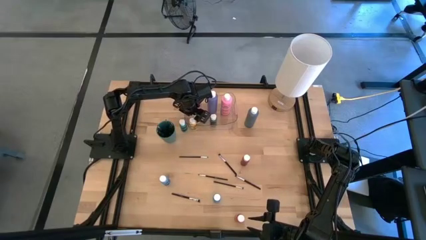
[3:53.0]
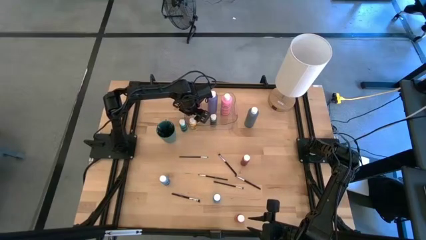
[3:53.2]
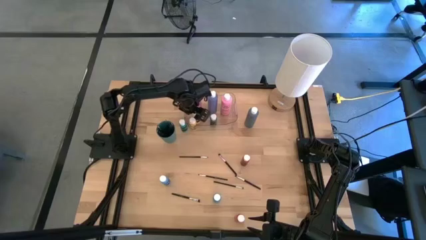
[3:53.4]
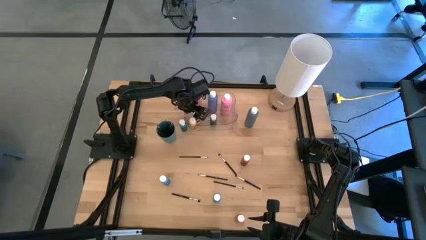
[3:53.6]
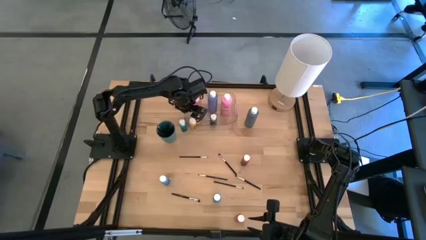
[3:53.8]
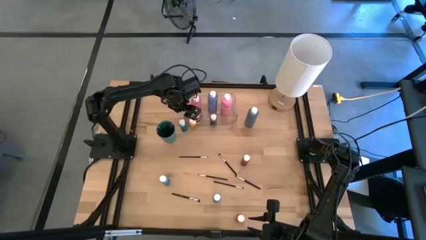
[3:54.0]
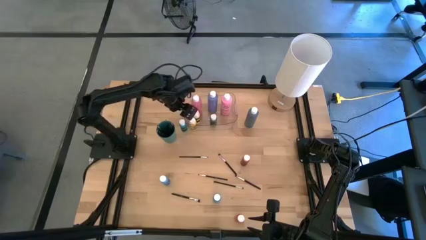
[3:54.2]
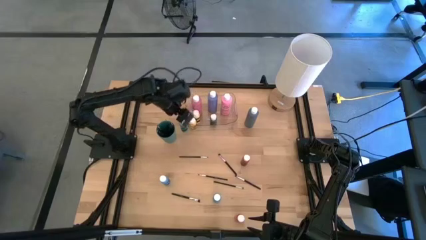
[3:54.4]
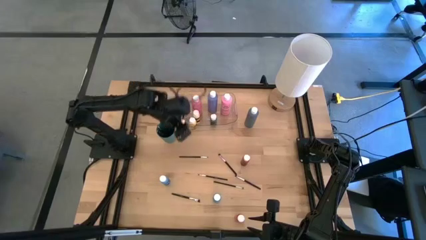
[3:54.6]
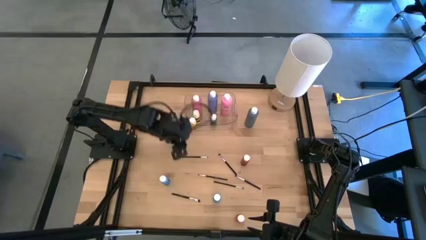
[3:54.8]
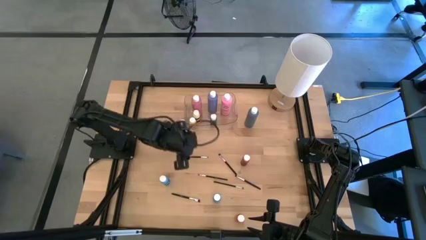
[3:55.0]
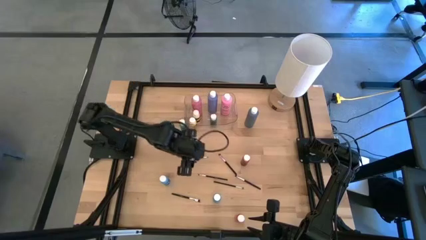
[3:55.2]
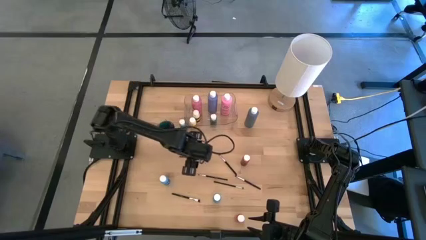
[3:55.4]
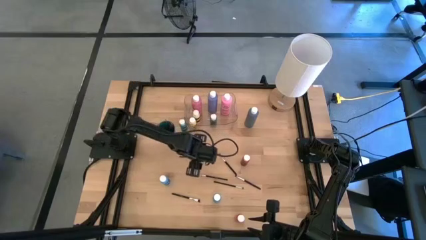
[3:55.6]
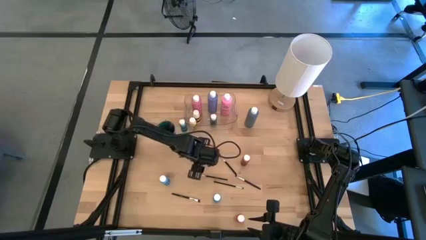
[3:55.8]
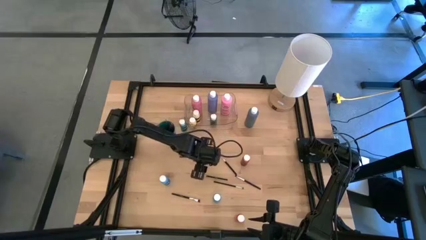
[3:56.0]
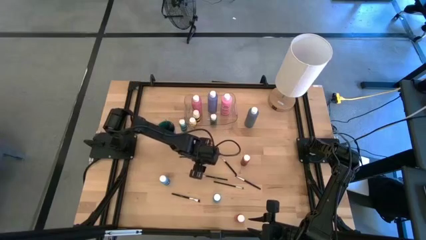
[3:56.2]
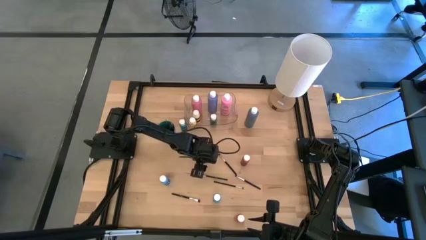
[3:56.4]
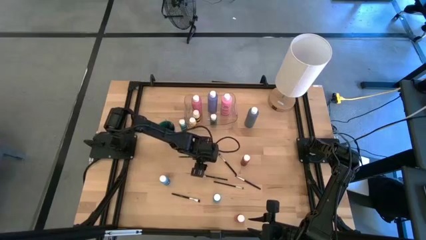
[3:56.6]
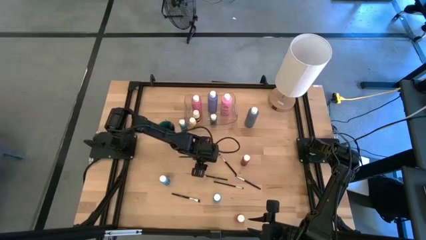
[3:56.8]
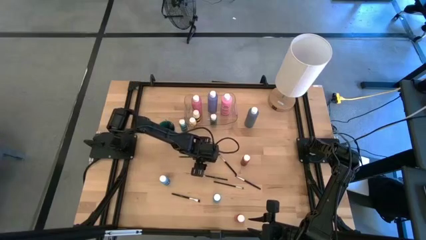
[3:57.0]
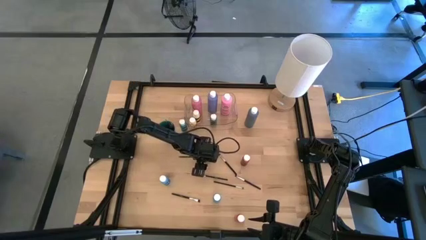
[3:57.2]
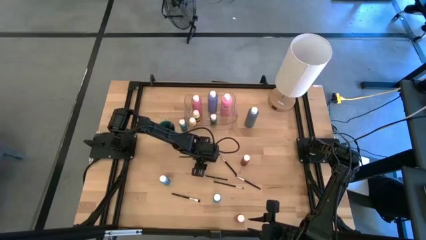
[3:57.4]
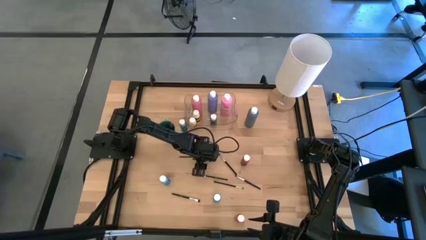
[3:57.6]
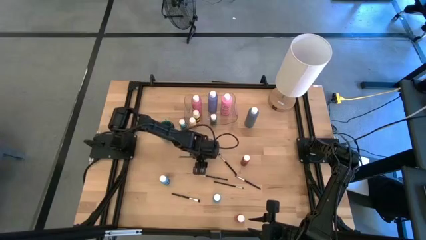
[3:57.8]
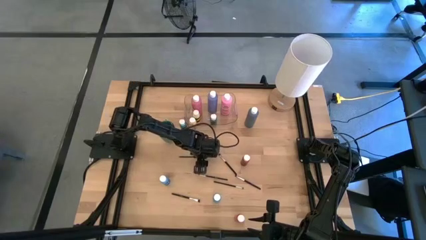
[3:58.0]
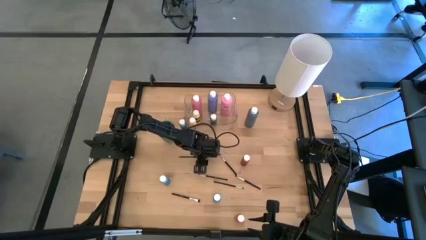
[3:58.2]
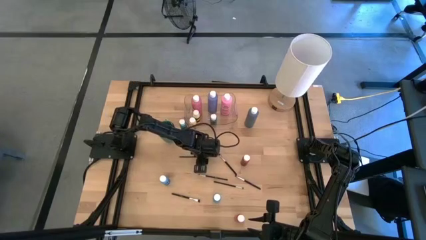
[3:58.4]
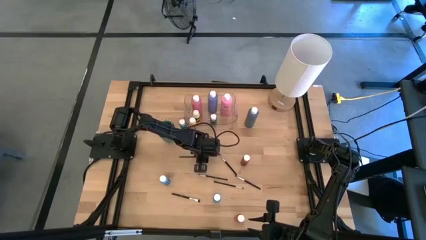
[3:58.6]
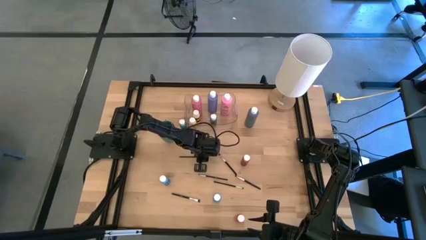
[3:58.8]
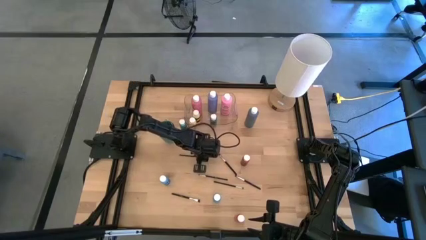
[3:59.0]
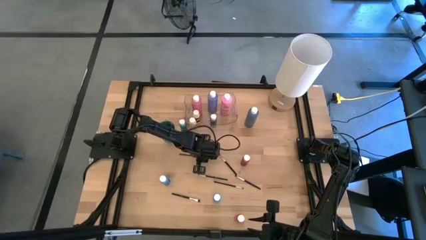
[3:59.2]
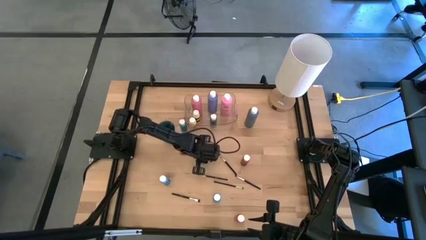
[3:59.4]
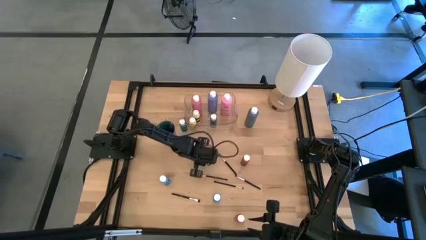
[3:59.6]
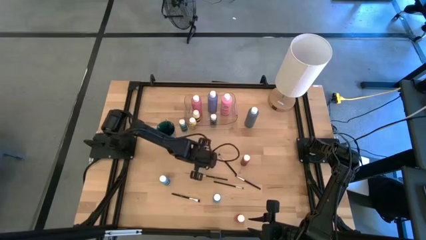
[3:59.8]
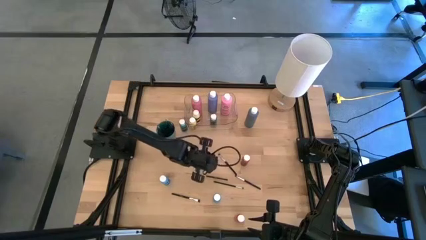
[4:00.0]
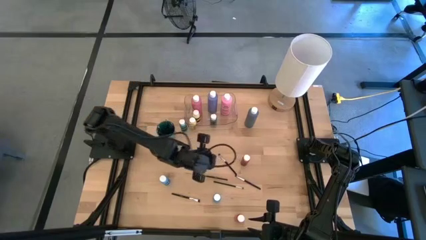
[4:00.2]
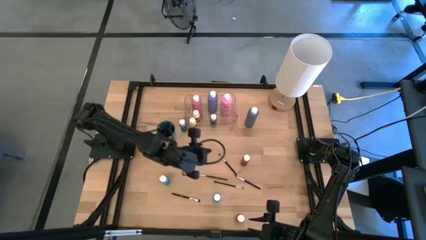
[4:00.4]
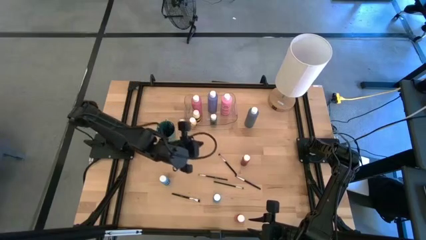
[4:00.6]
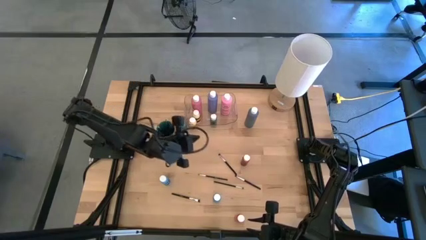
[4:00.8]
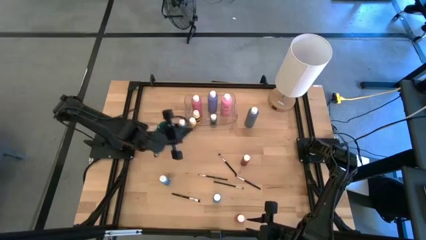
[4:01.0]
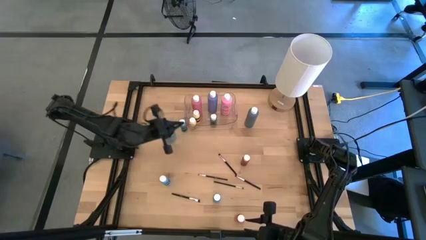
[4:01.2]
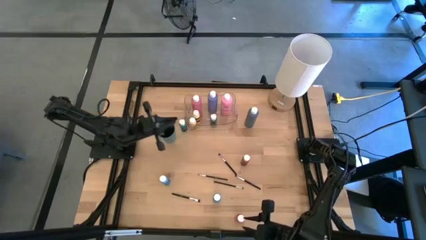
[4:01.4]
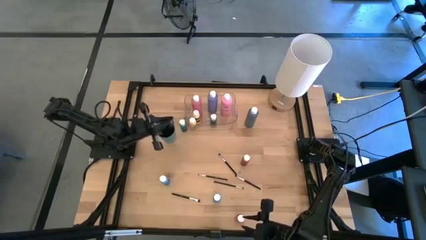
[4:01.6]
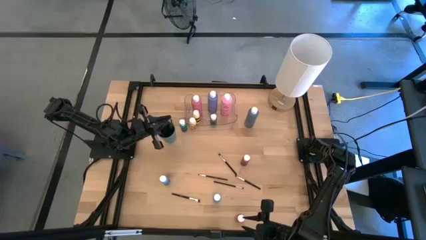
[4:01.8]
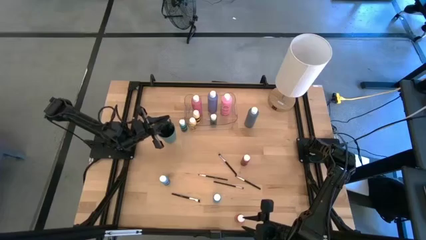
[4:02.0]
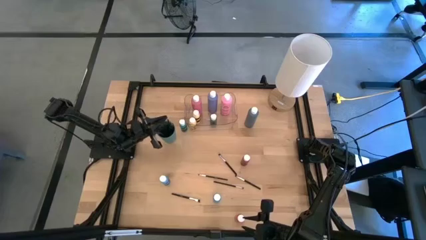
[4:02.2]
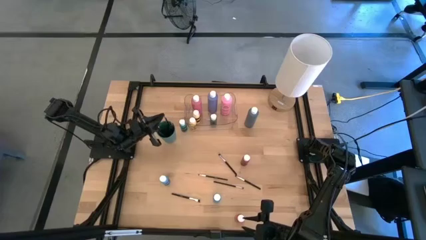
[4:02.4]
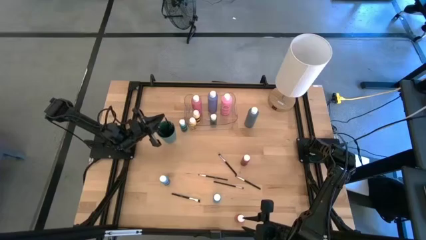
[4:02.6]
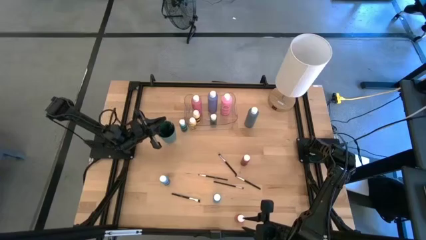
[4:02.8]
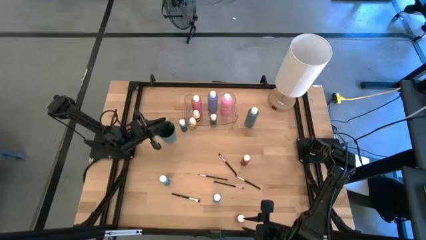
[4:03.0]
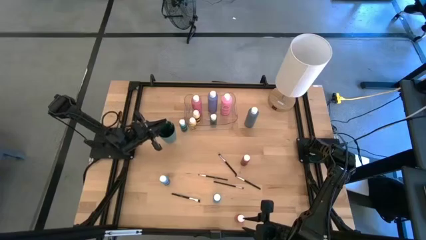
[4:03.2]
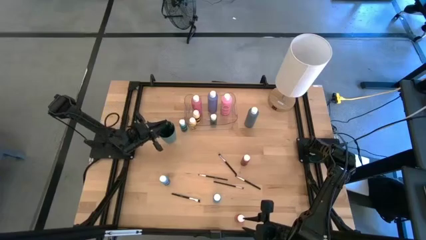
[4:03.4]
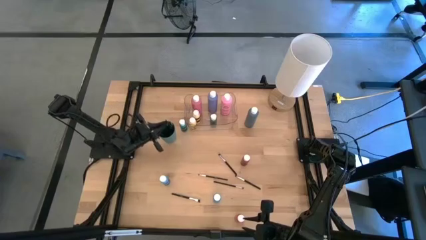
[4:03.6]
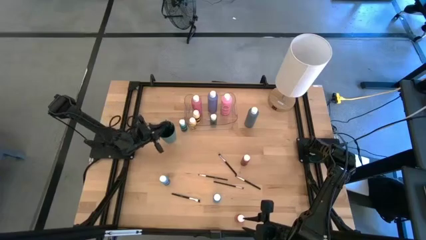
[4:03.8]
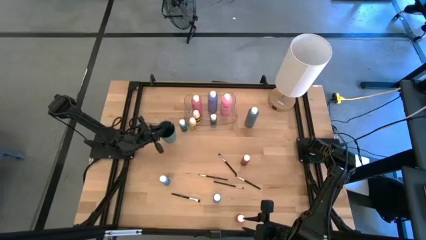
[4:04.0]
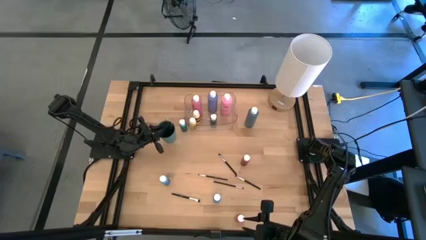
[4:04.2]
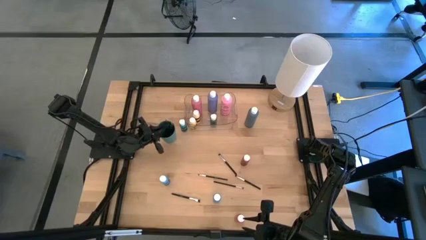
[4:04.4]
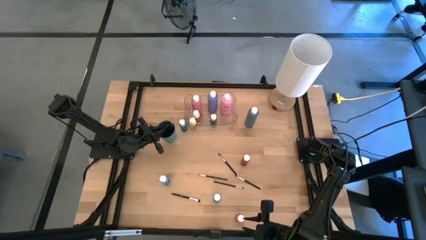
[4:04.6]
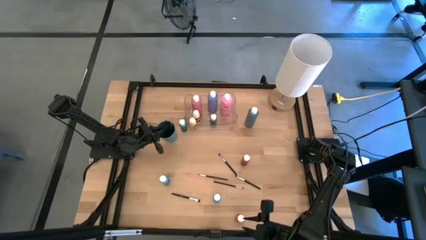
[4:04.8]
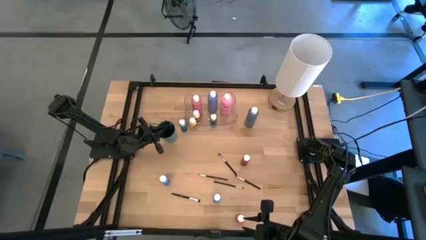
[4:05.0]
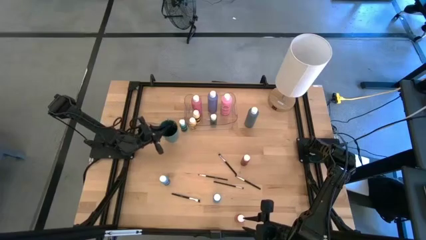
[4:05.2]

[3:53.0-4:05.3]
Task: Pick & Place Paint Supplies
Put the black paint brush into the green cup

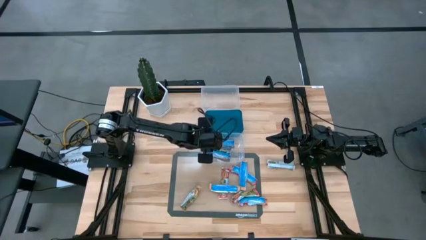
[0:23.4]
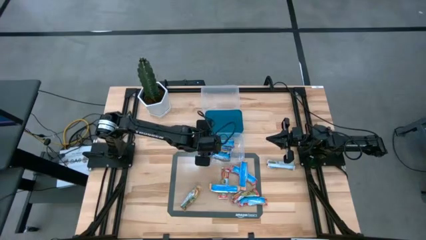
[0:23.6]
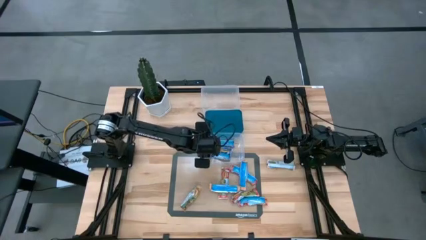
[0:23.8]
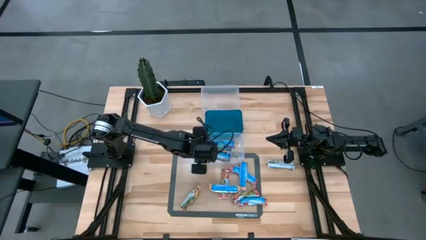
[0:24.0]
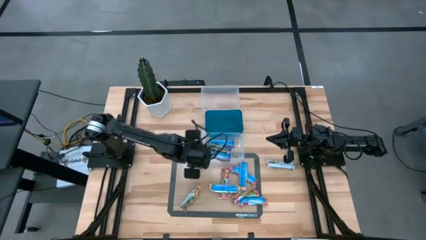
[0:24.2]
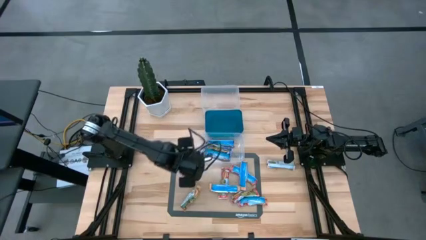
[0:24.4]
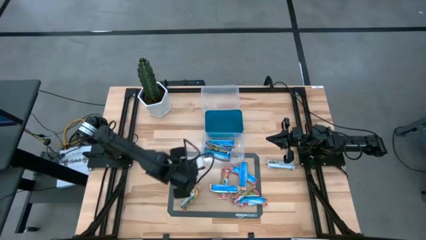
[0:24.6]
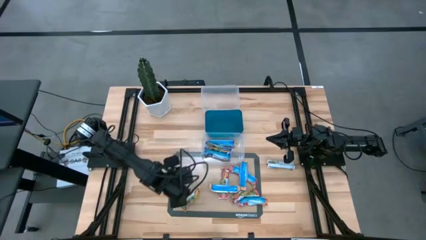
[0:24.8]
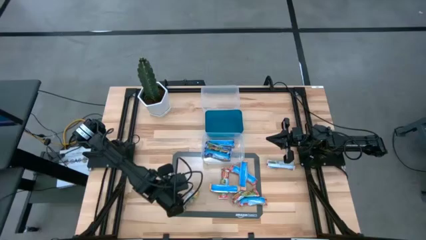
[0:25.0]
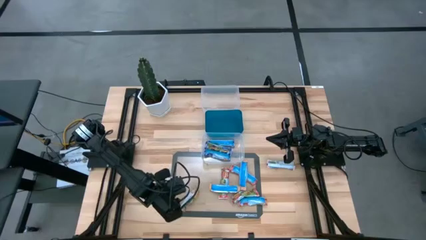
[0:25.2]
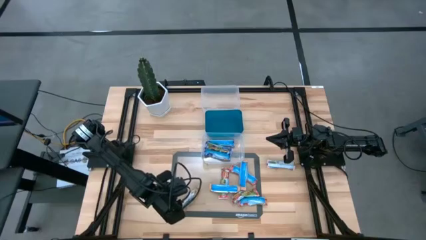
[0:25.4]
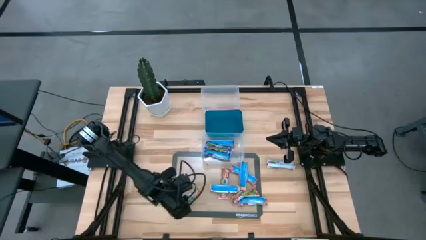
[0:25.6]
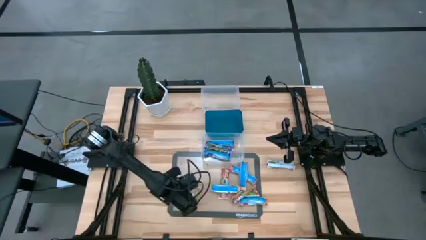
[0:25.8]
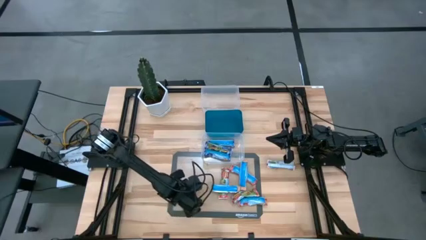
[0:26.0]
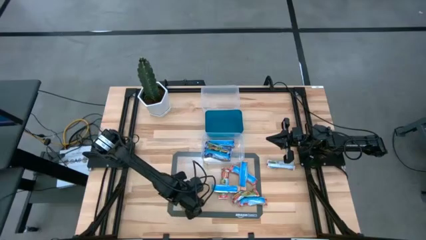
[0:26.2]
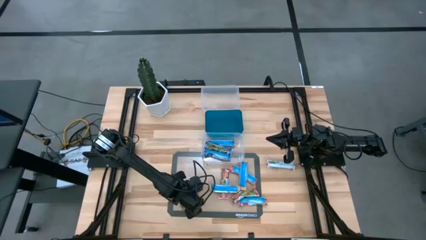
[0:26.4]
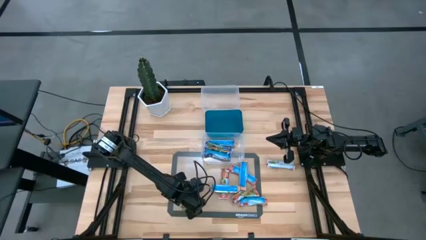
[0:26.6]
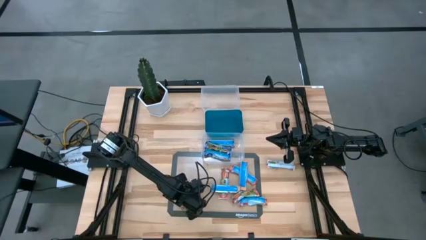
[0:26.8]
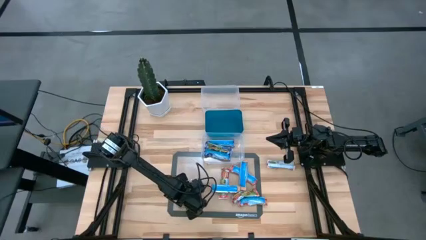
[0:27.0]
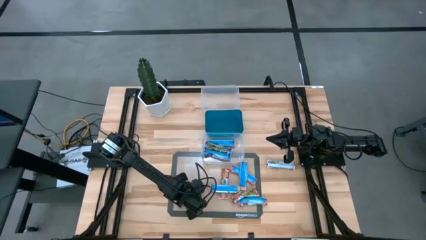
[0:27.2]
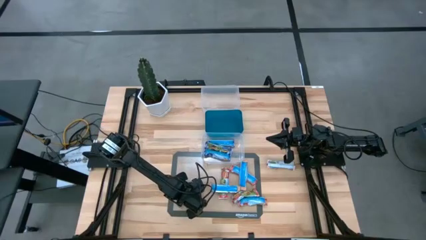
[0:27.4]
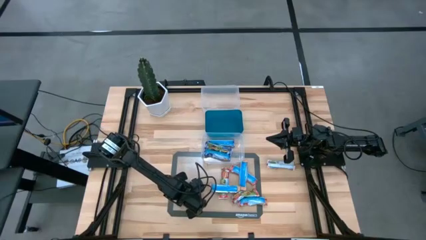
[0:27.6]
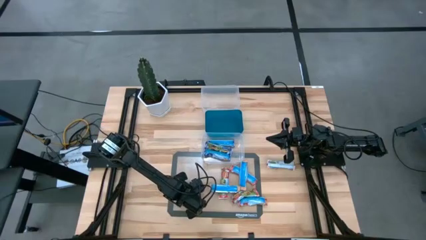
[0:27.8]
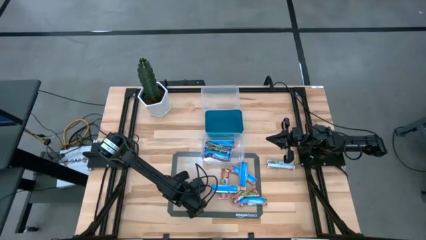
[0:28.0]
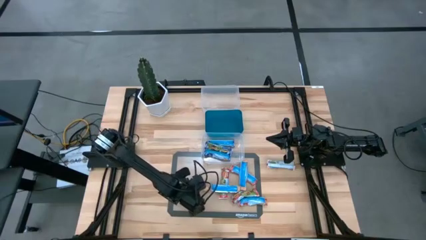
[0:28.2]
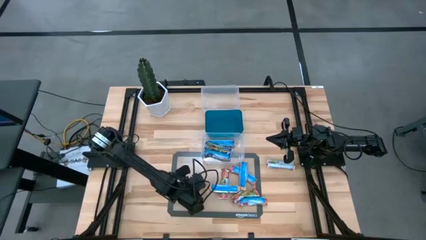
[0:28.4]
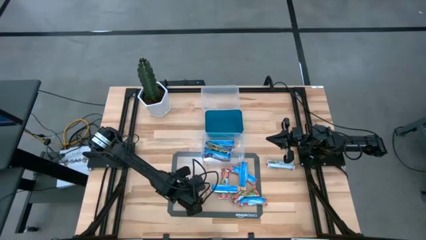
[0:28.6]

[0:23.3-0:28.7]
Task: Pick and place Granola Bars by type
Put the yellow granola bar into the top transparent bin
